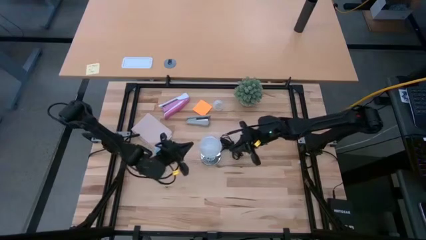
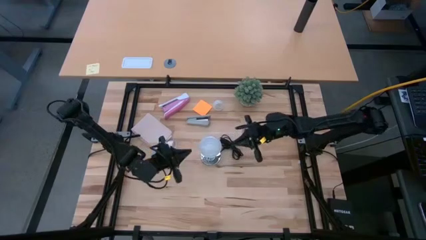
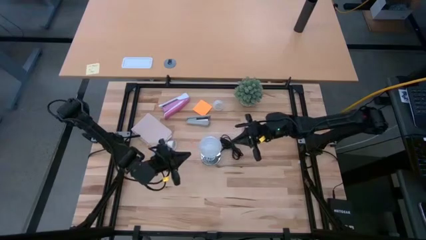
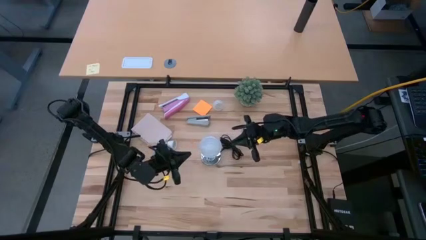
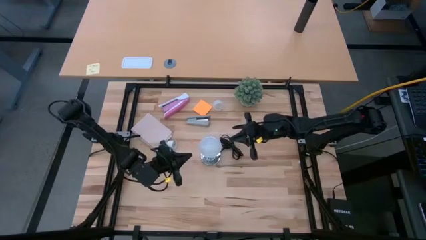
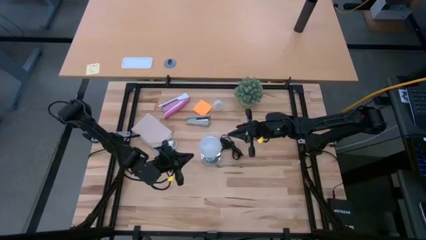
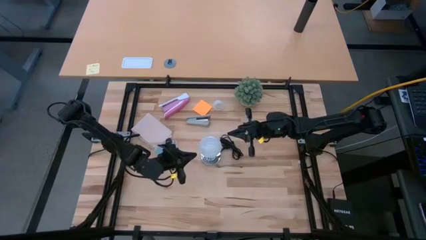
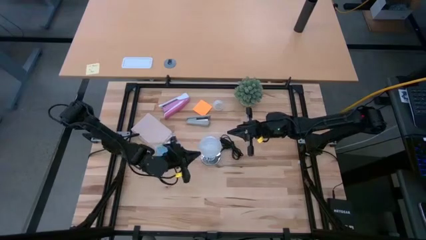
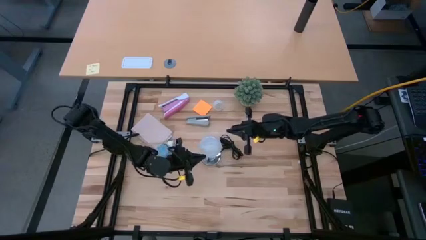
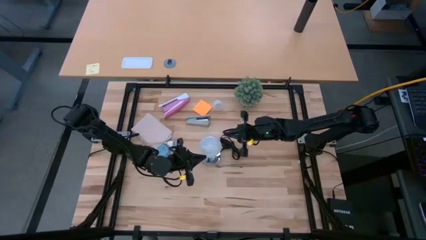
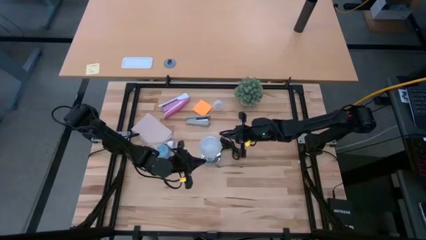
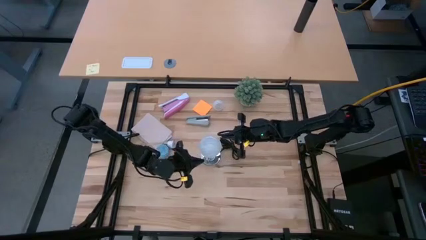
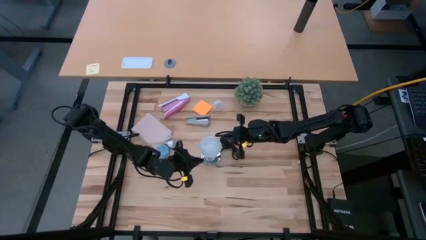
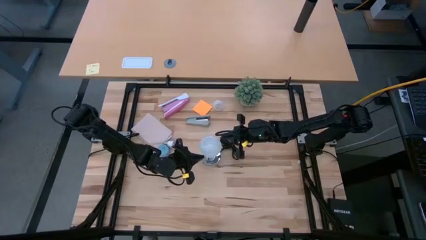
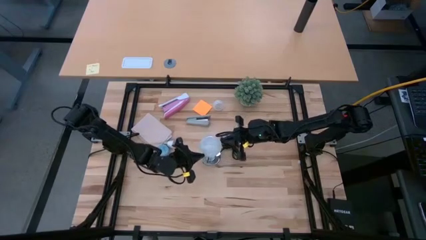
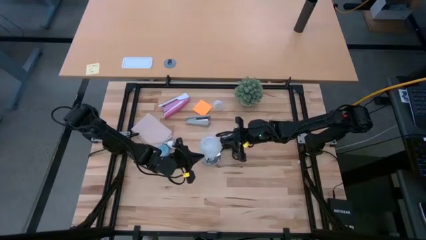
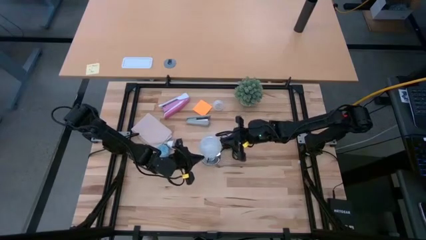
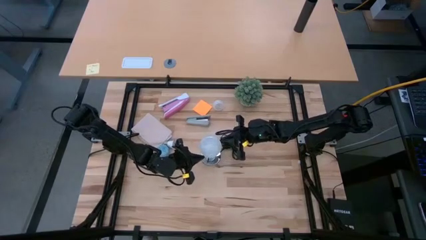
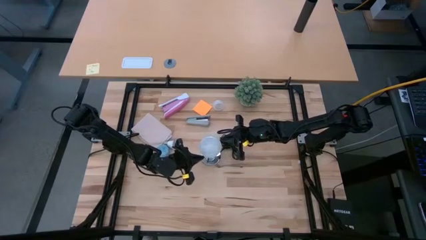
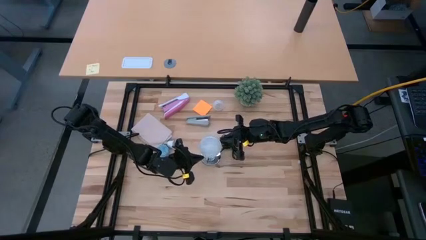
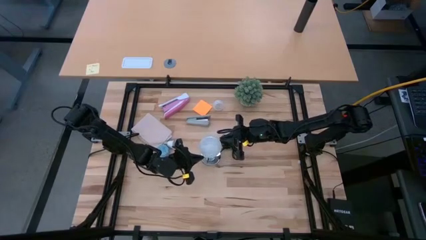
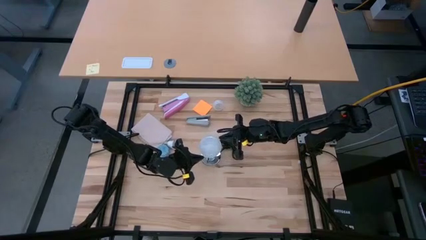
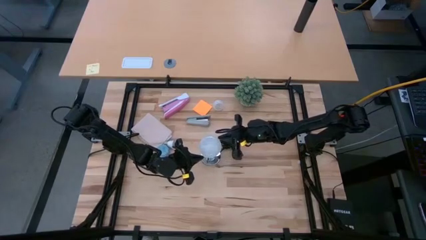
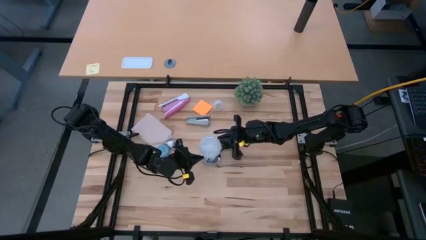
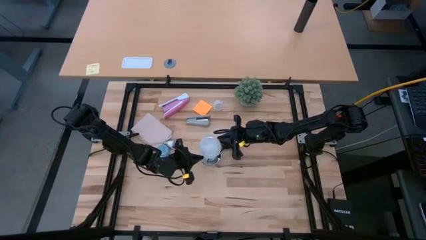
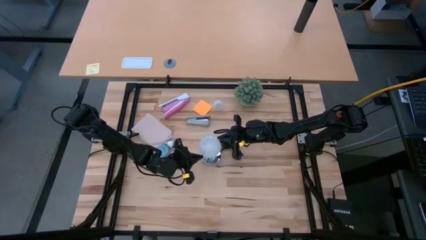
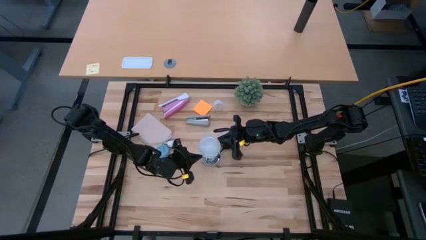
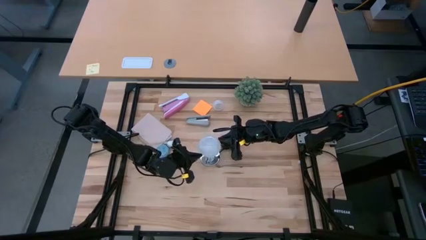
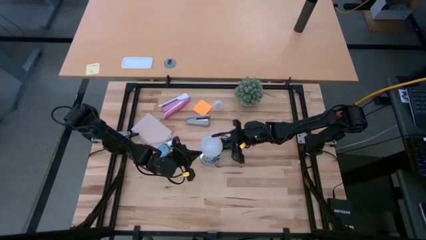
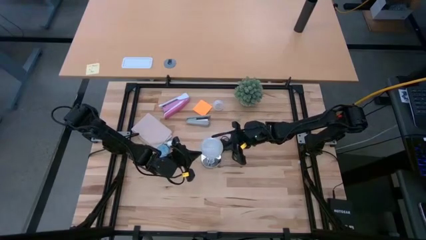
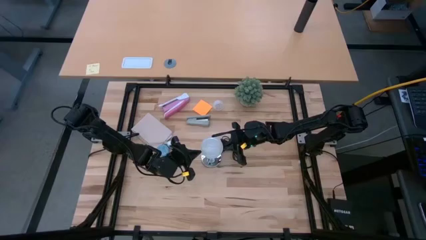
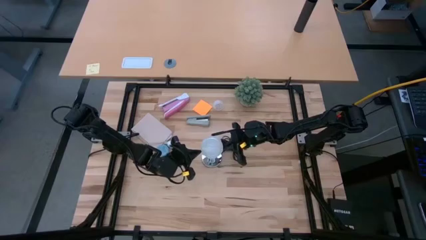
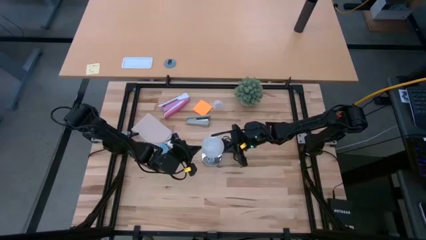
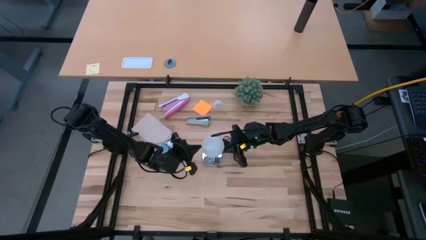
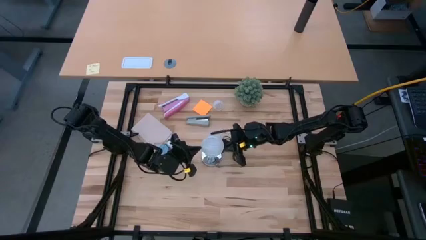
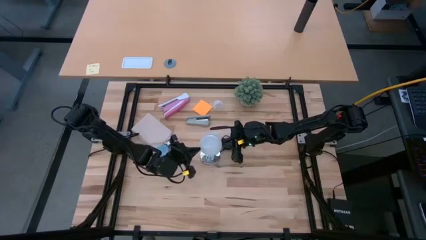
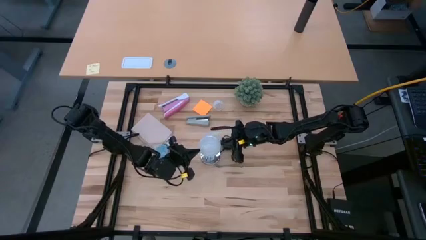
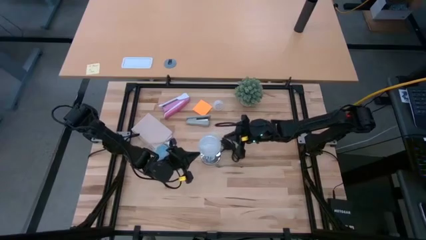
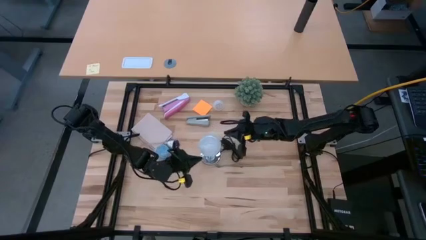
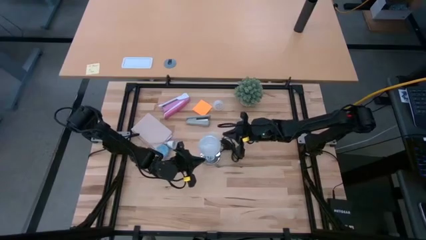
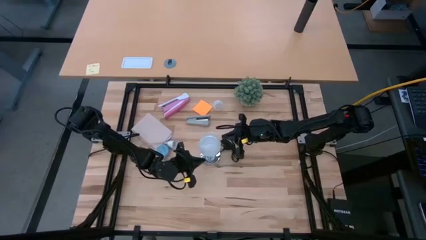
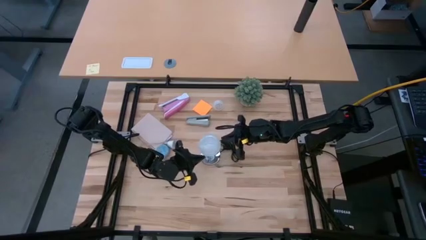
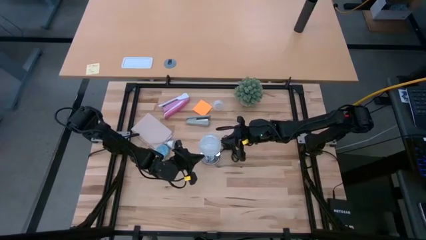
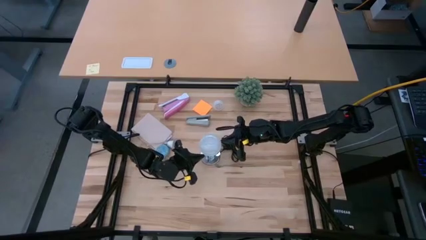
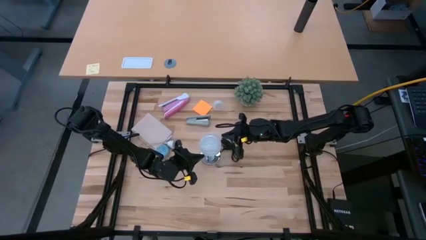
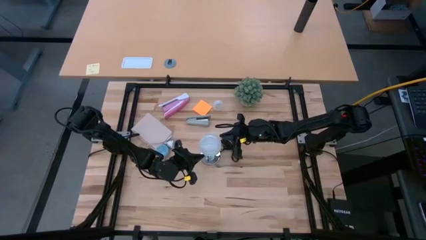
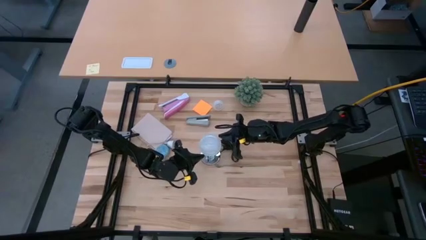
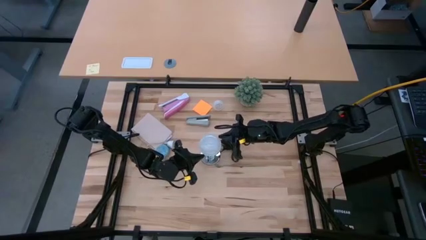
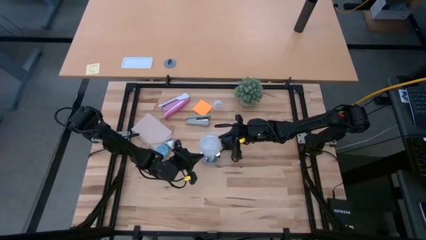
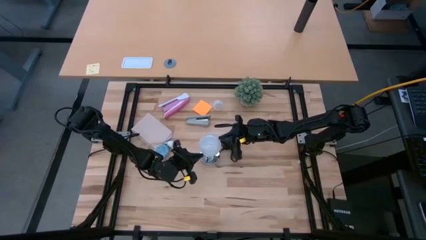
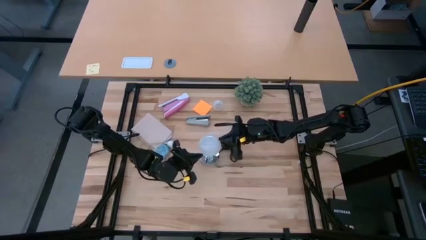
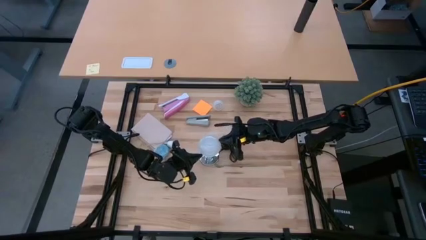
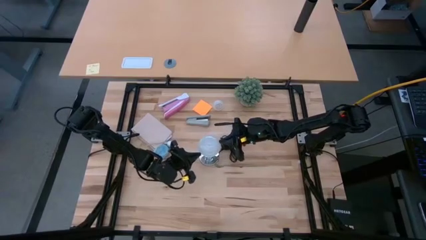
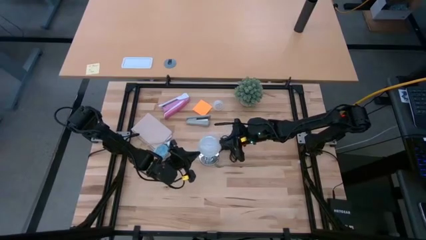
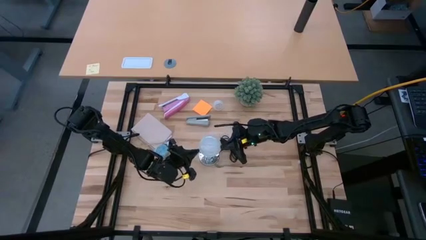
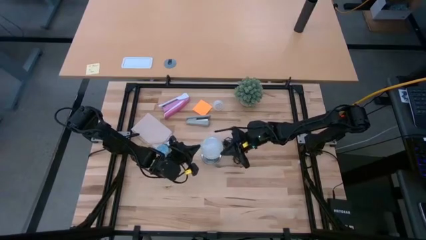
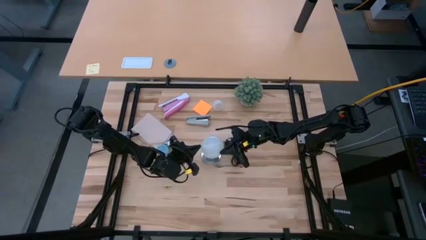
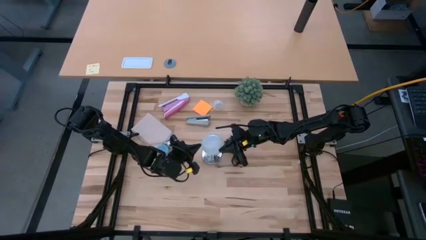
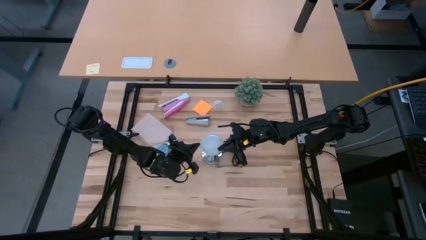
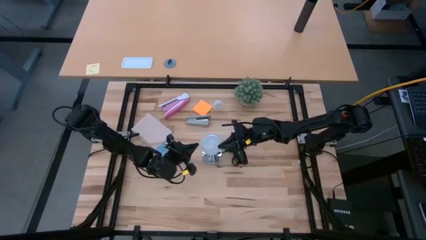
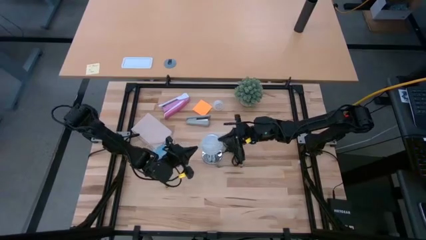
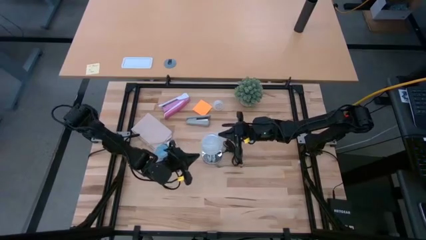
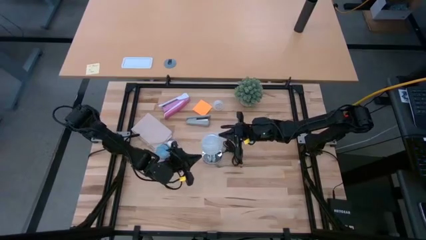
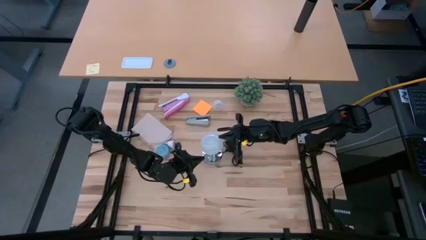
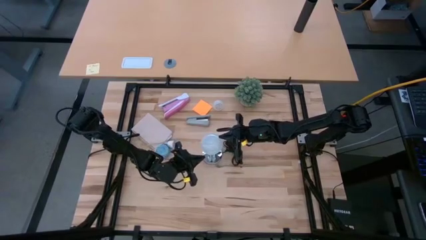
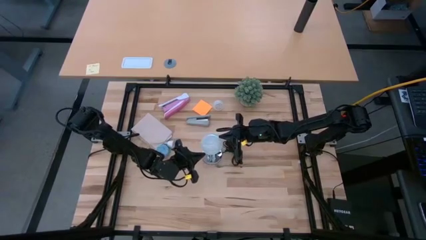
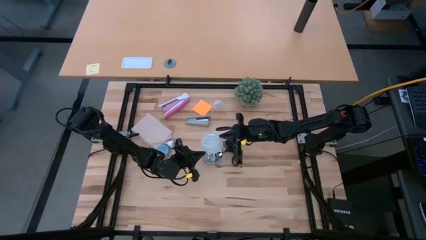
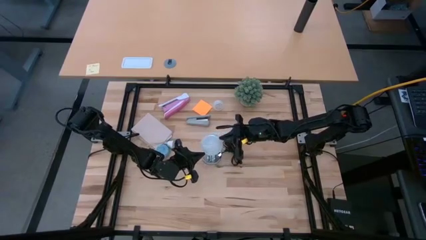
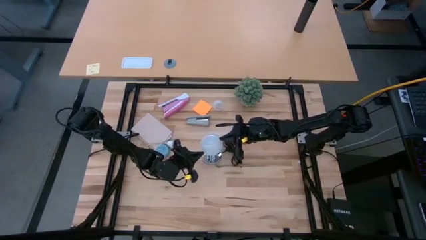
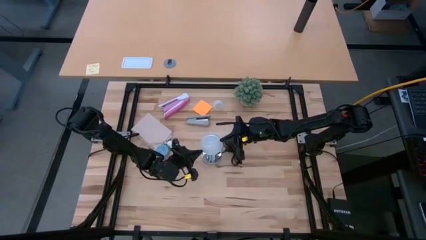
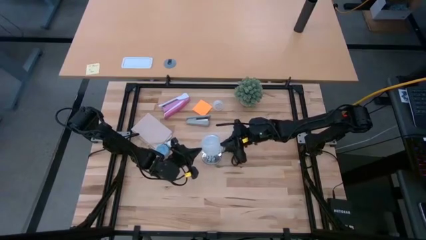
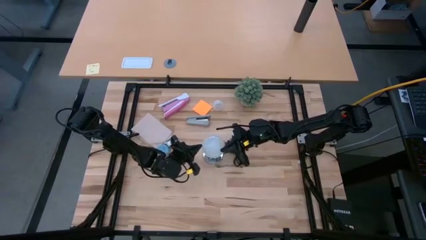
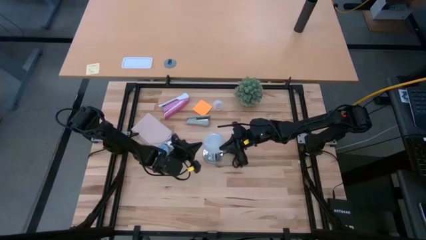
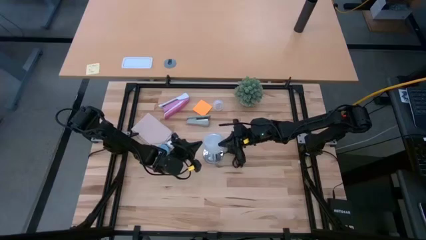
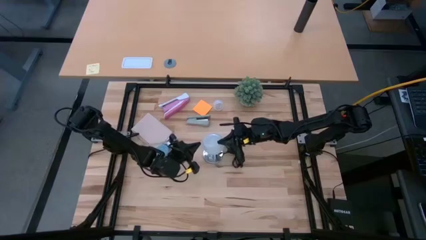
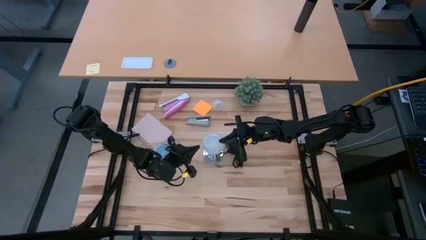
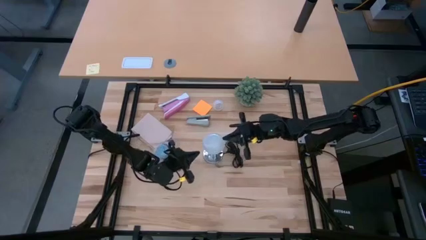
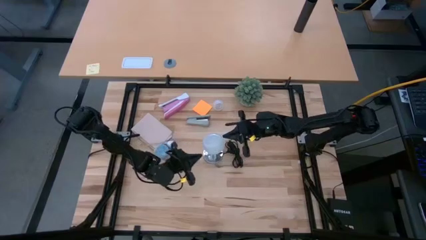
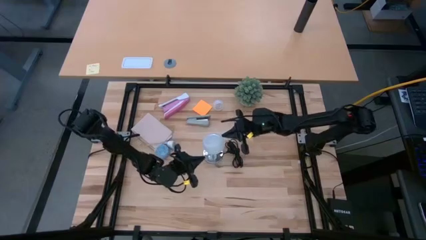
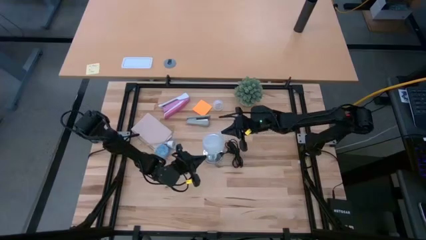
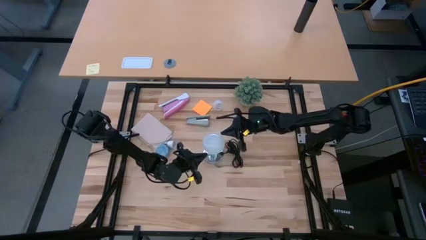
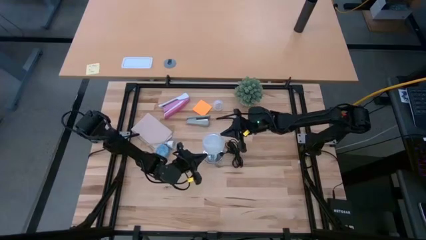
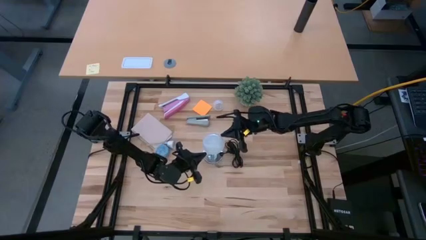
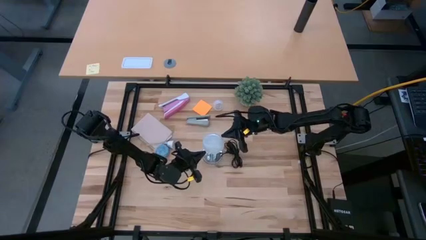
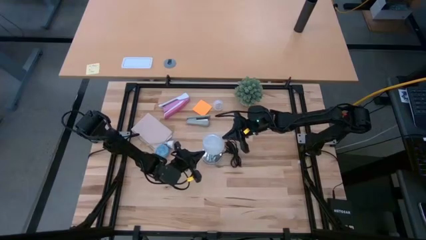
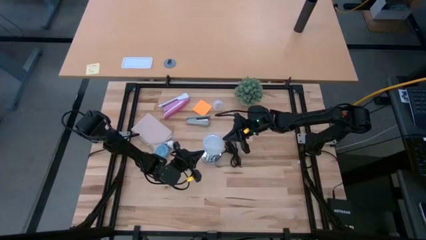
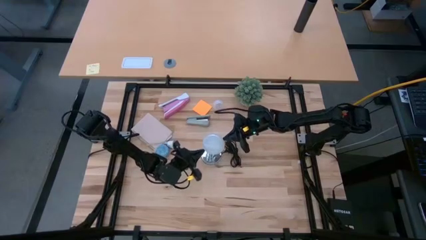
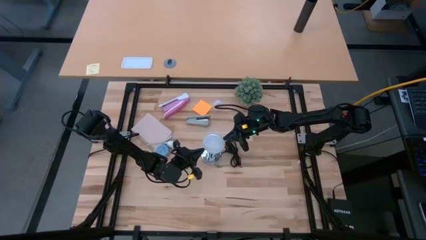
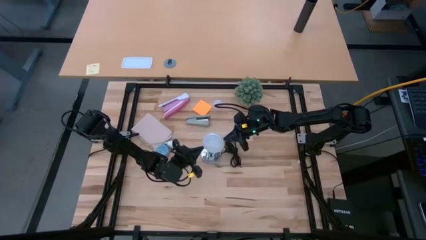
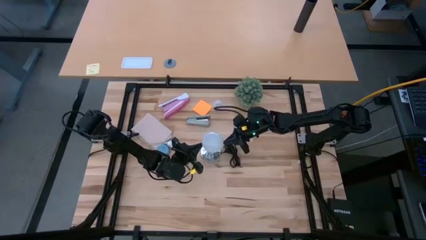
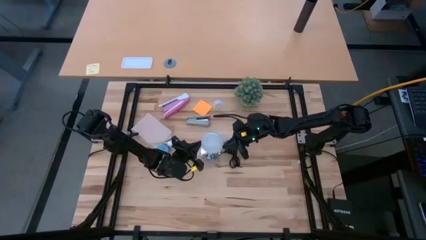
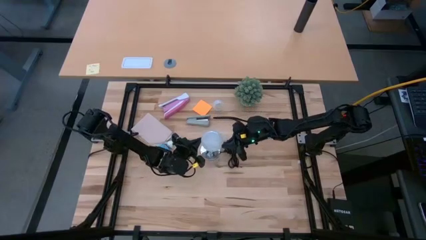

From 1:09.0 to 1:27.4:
Task: Screw lightbulb
Insert the lightbulb on the lamp
